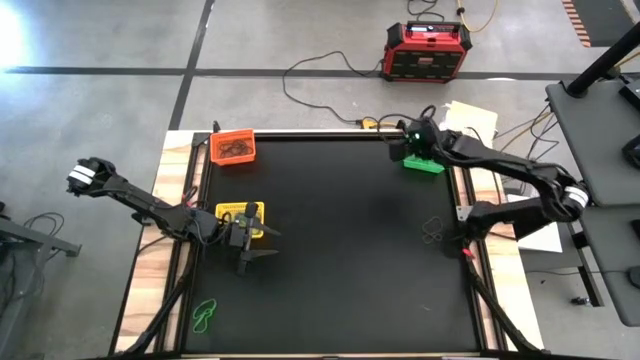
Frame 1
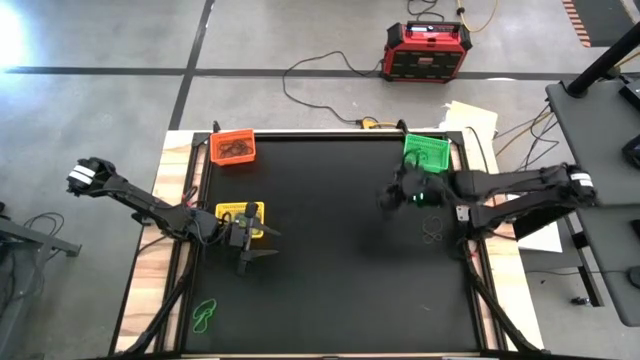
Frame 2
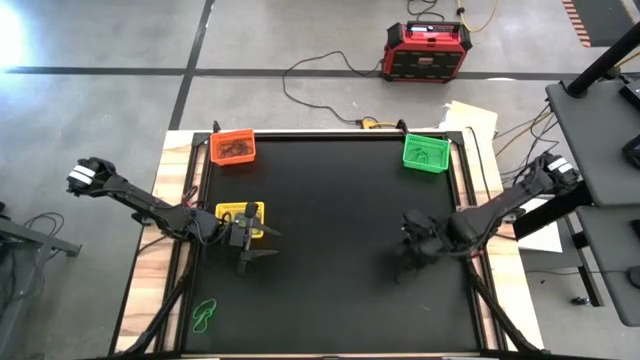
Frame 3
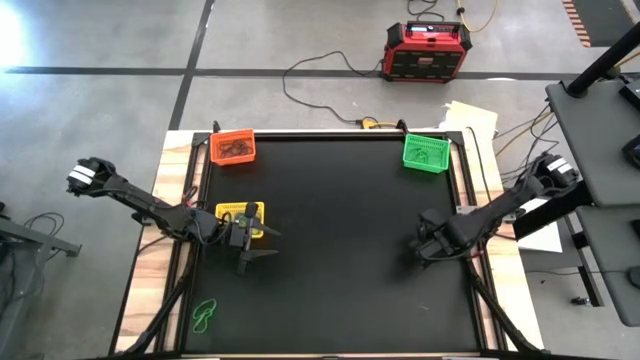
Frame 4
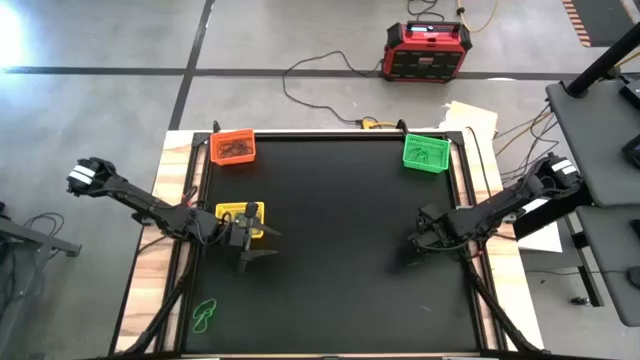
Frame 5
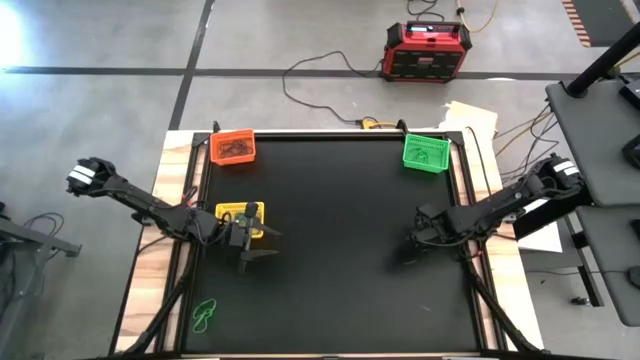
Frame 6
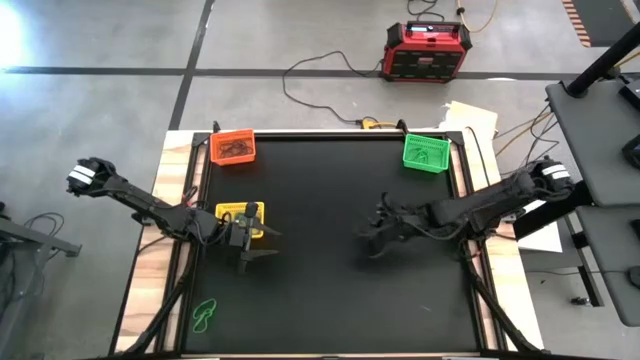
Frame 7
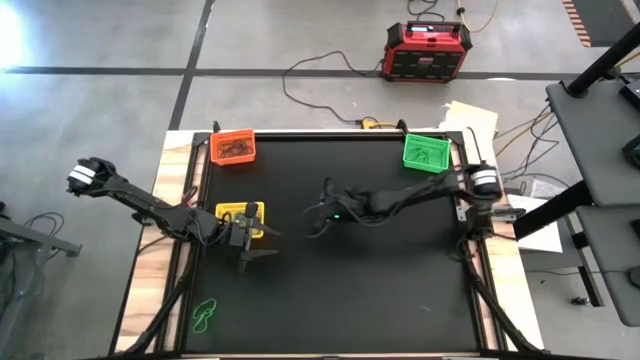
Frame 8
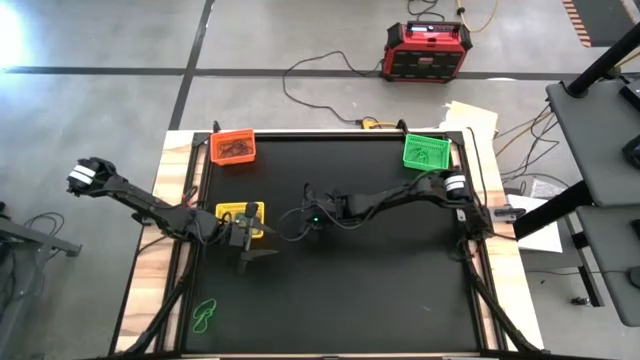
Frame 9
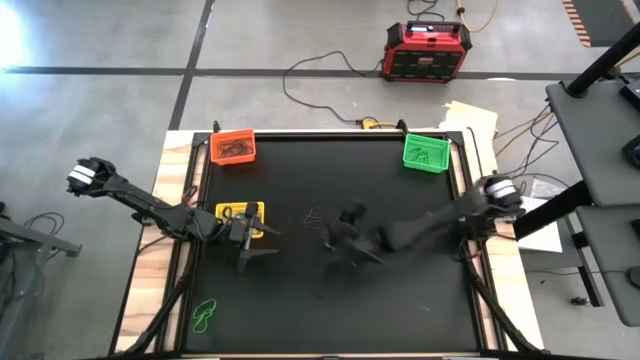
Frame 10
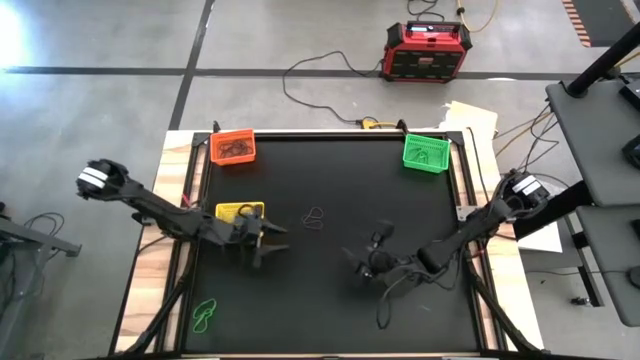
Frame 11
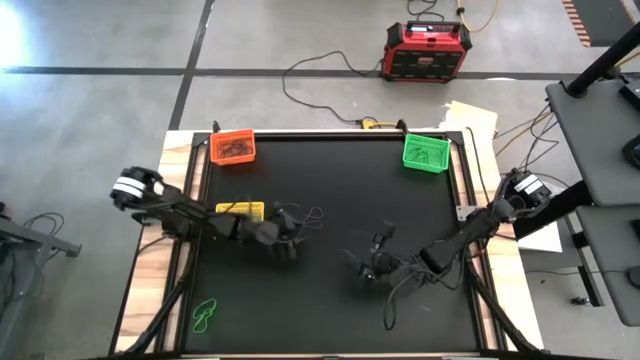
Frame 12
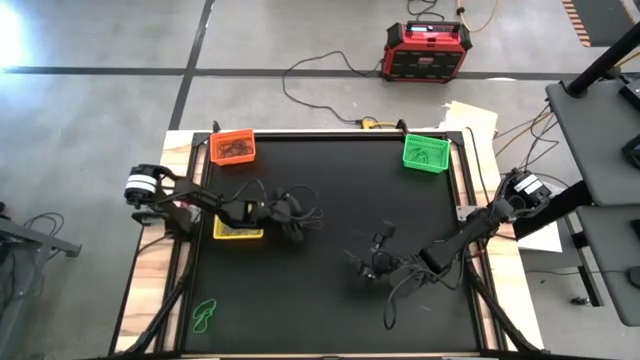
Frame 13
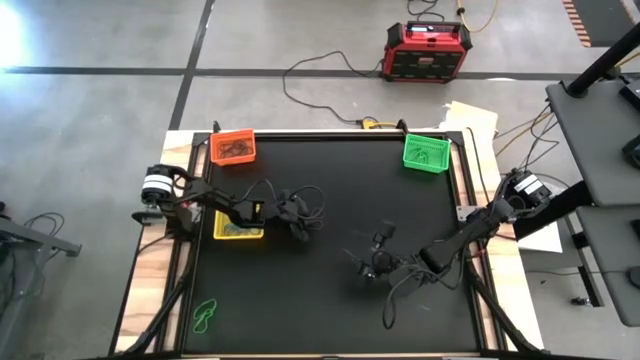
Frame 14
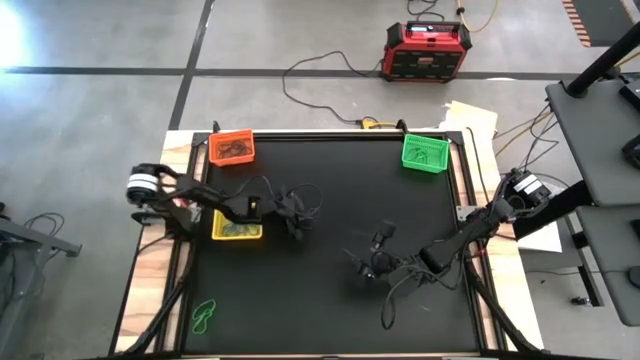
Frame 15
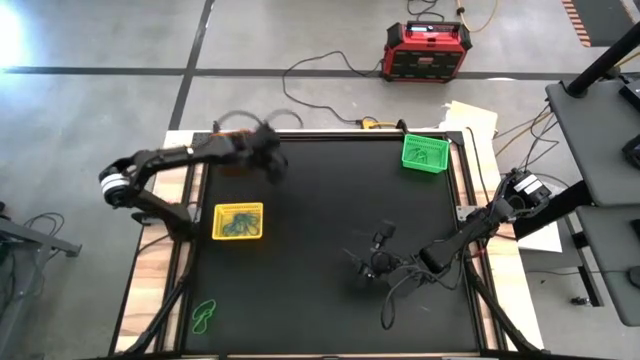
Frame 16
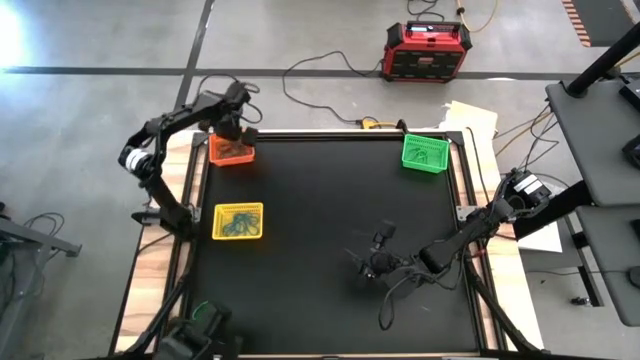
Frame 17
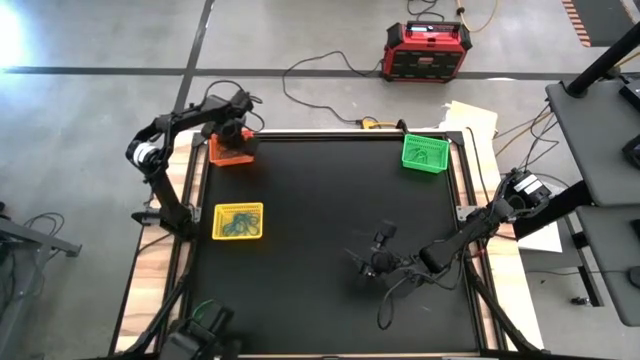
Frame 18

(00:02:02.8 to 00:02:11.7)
Task: Sort rubber bands into baskets
Put the purple rubber band into the orange bin

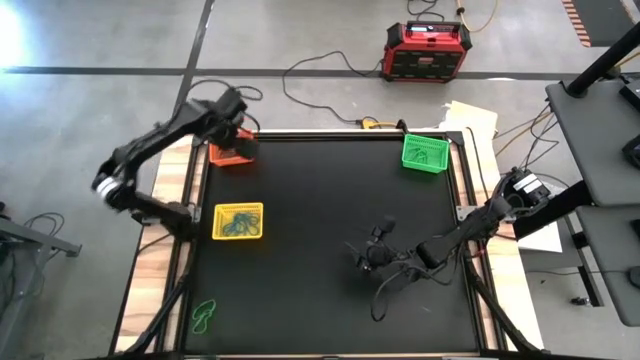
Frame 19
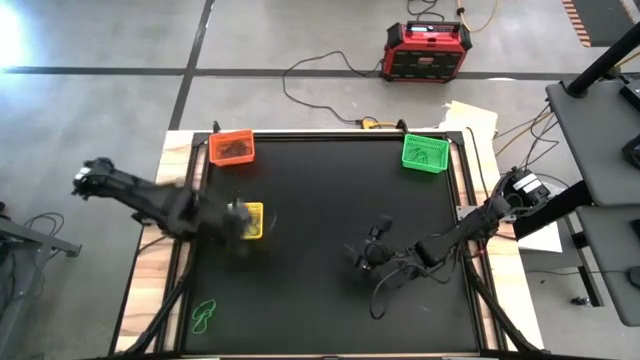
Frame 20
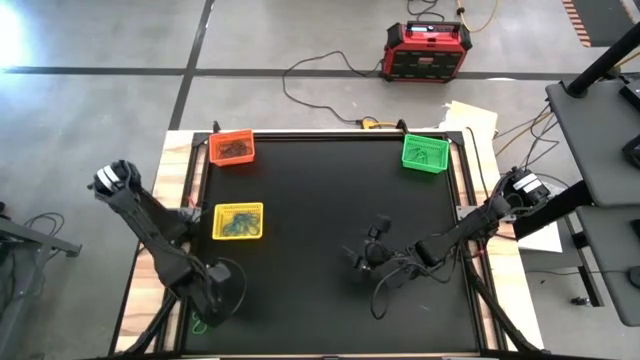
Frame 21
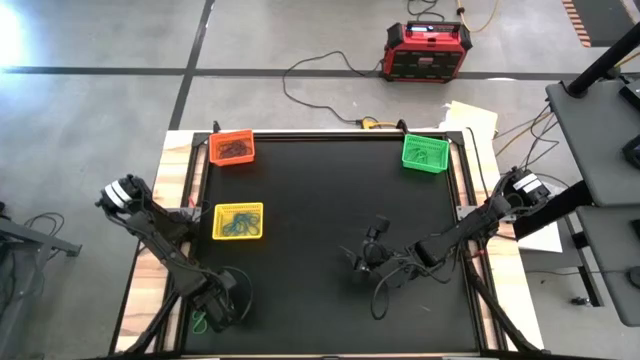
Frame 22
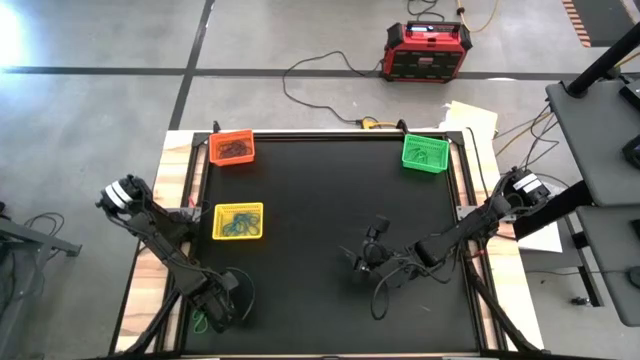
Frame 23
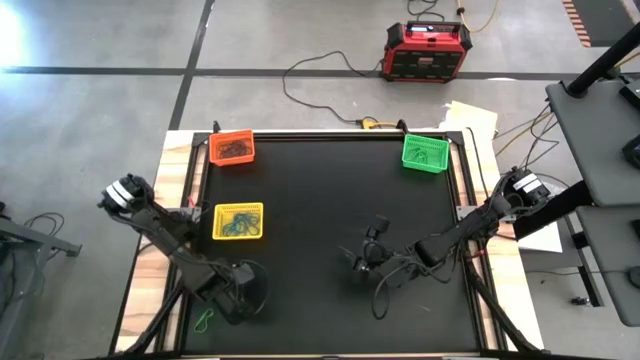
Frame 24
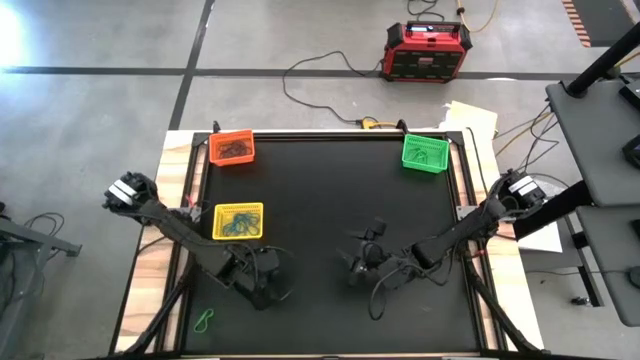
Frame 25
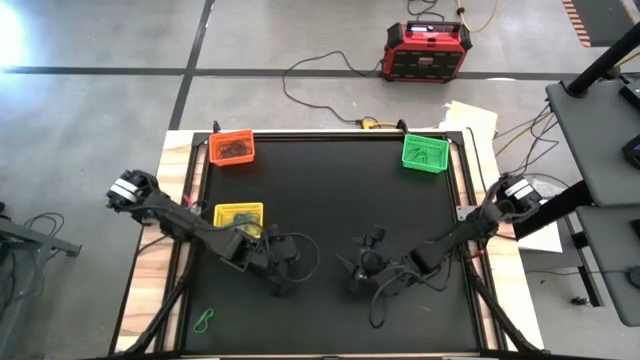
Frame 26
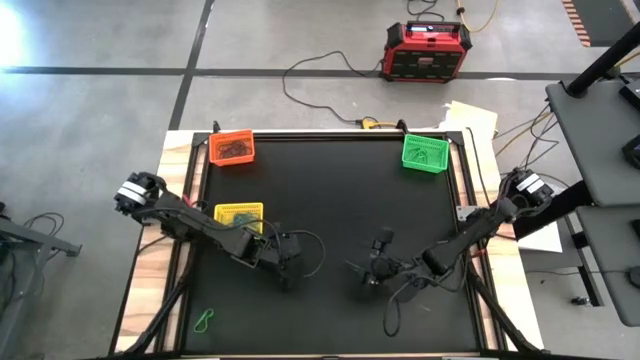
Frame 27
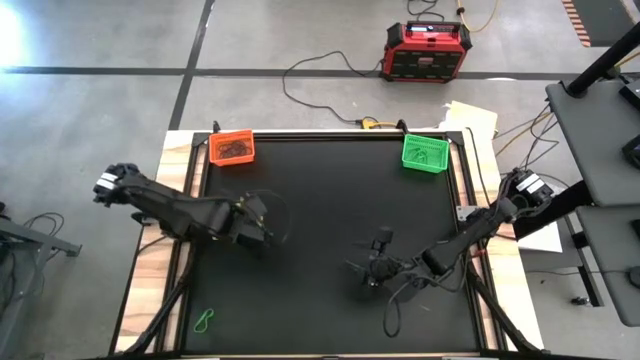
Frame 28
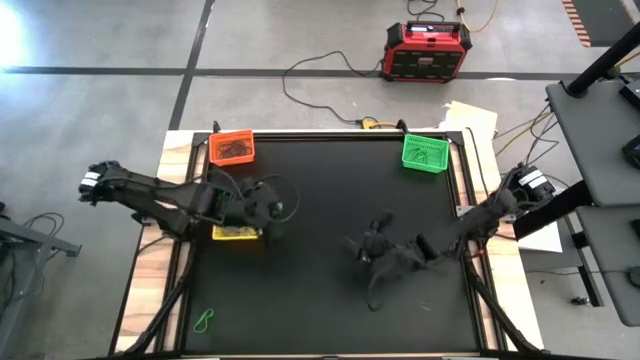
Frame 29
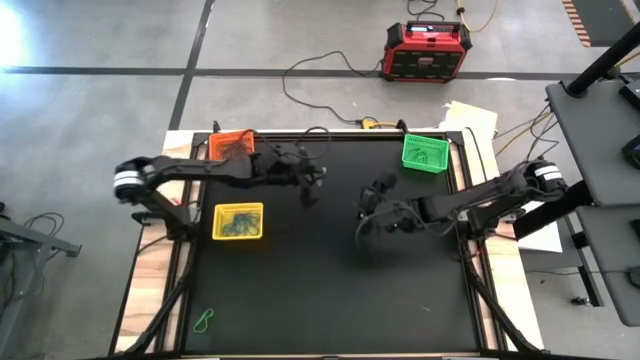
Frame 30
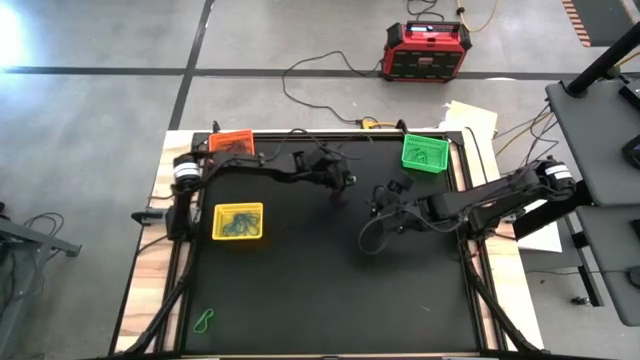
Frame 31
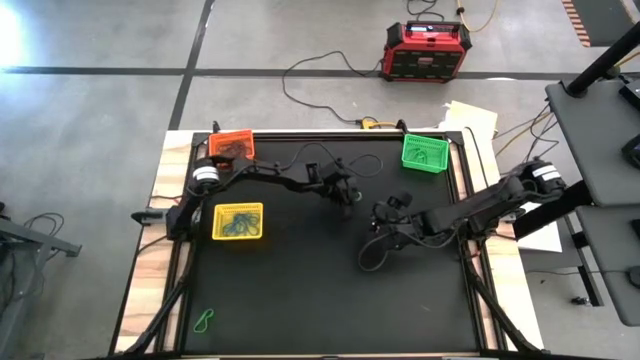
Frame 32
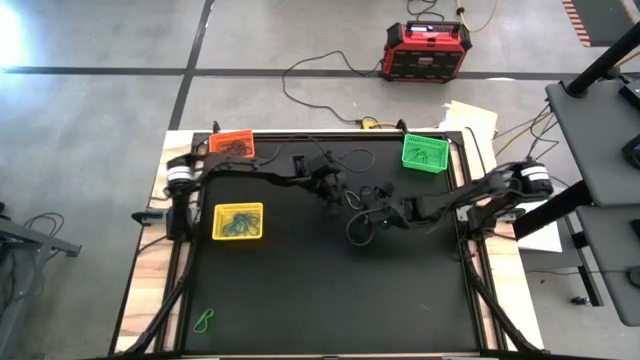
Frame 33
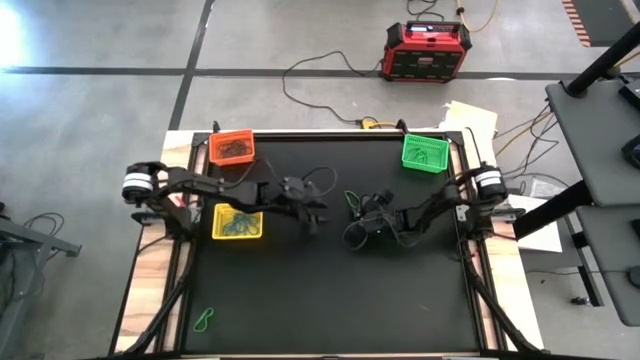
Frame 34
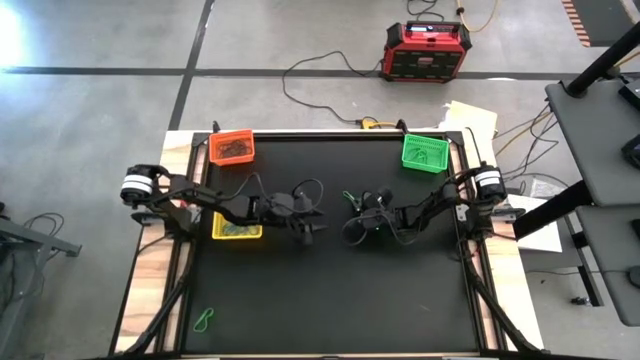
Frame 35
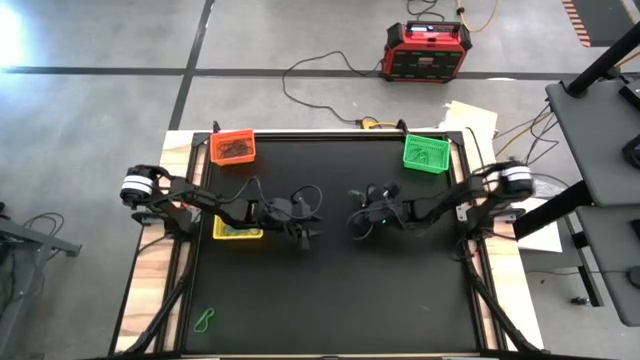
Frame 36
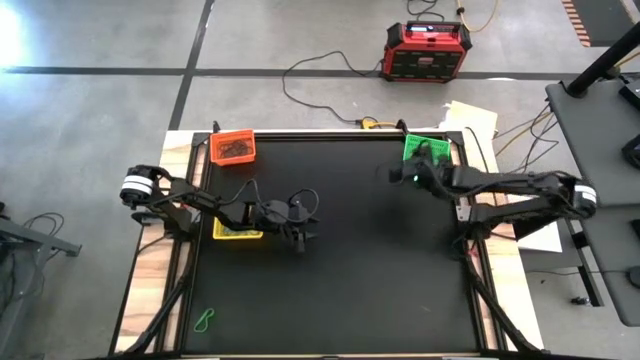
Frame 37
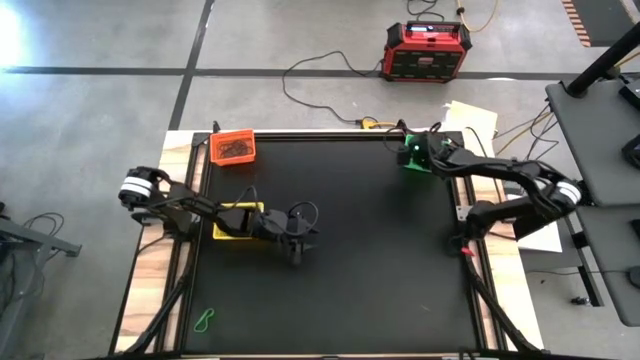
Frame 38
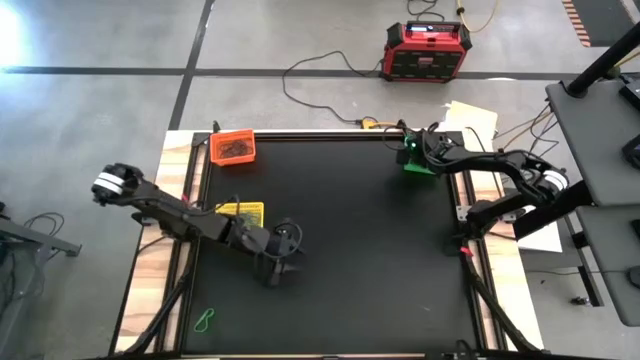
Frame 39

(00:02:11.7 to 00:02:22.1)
Put the green rubber band into the green bin
